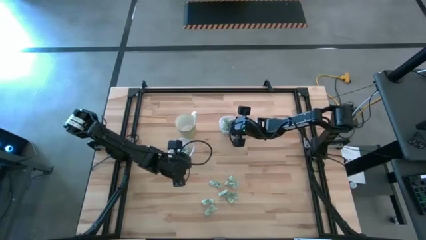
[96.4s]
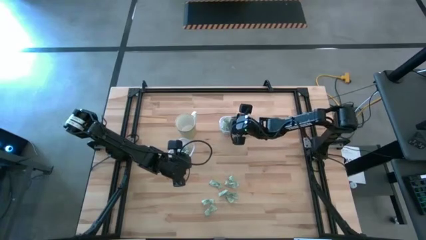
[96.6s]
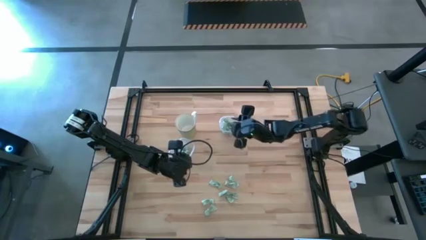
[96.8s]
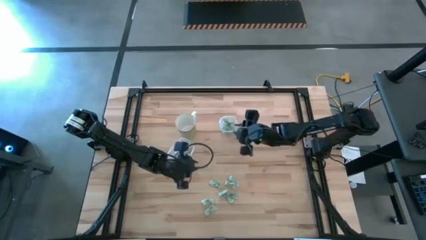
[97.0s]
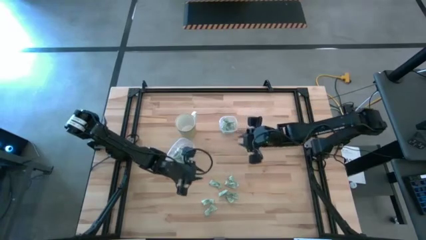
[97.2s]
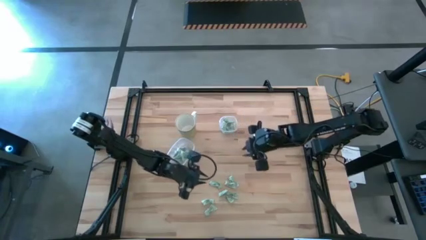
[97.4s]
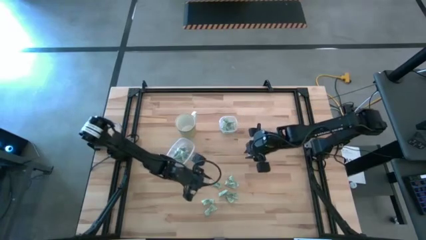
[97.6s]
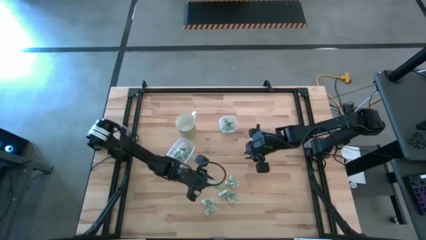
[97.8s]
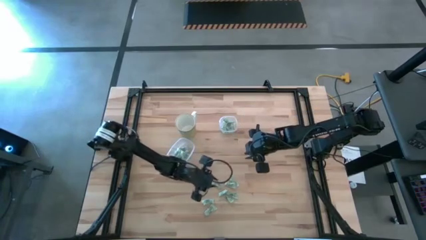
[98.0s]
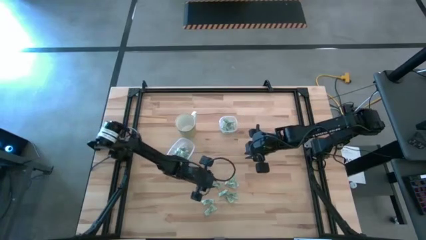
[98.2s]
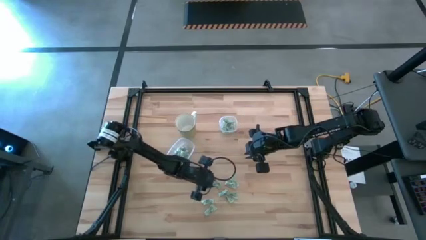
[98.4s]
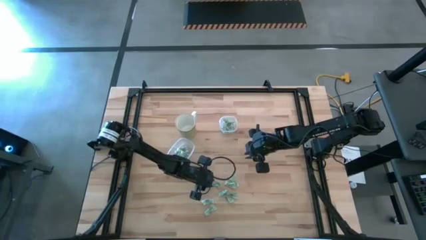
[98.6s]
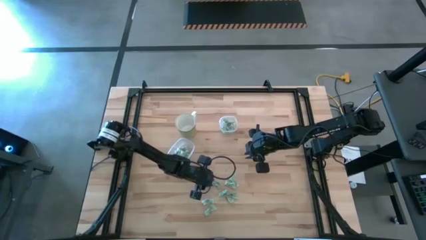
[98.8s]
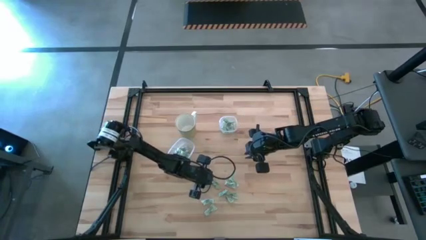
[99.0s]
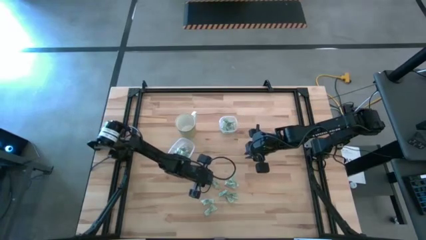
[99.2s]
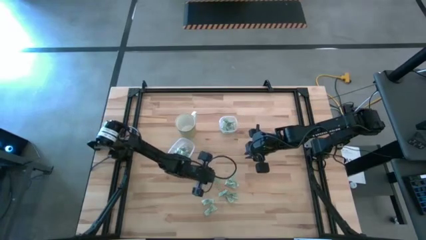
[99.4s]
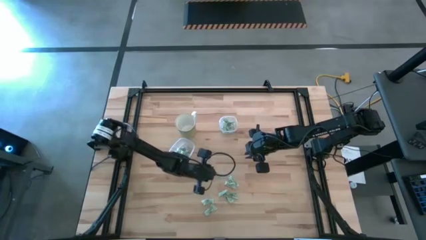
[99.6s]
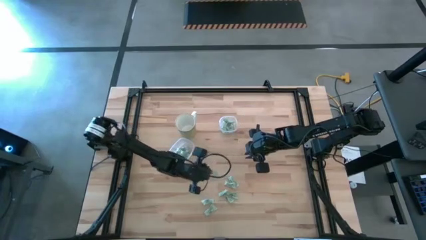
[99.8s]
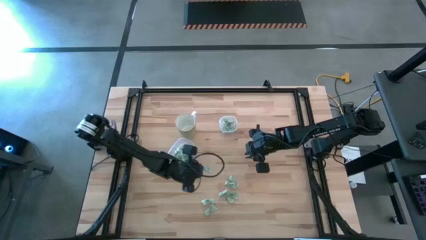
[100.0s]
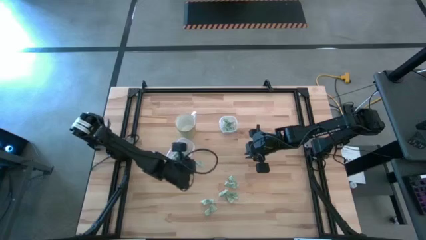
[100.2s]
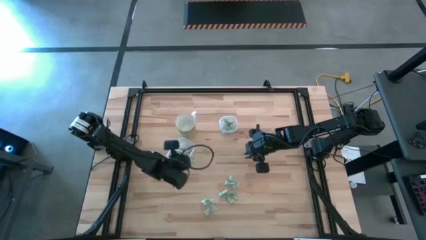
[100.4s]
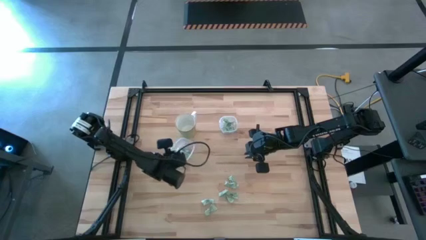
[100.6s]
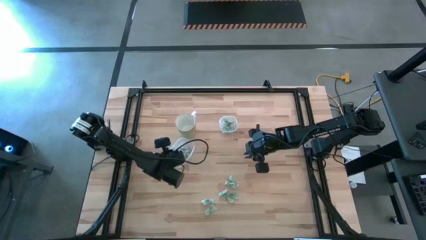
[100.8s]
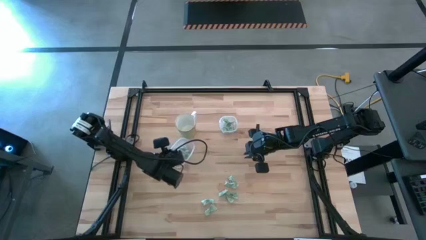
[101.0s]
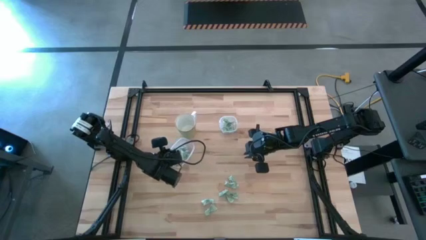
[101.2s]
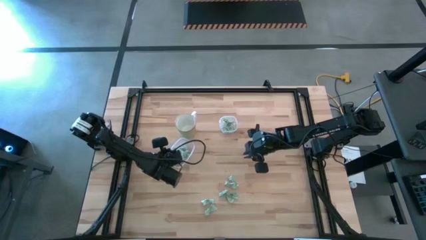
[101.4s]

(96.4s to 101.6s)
Task: Pick and place items into bin
Put the stevia packet into the bottom transparent bin

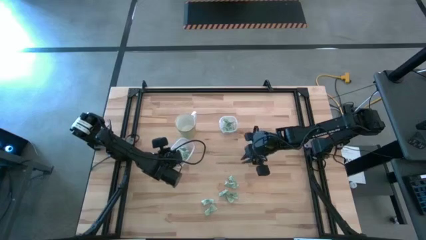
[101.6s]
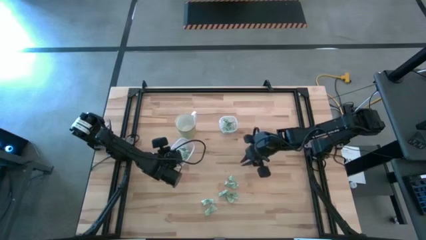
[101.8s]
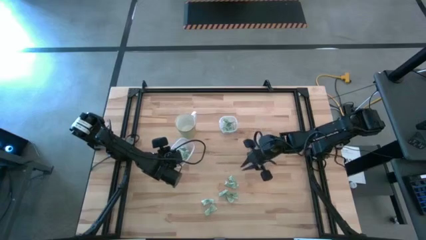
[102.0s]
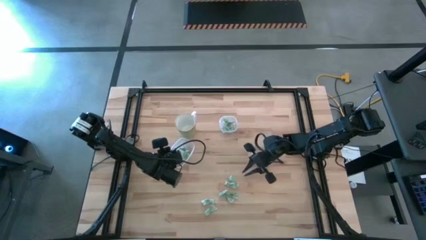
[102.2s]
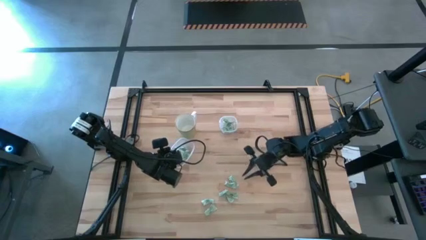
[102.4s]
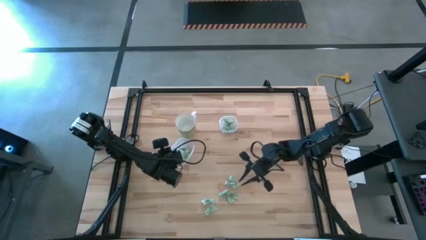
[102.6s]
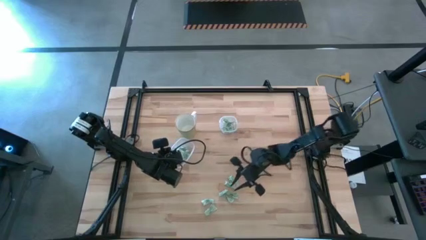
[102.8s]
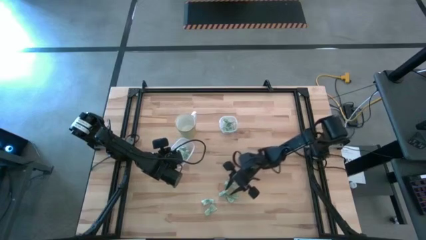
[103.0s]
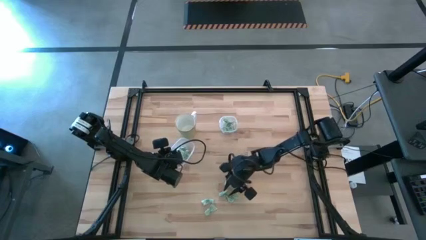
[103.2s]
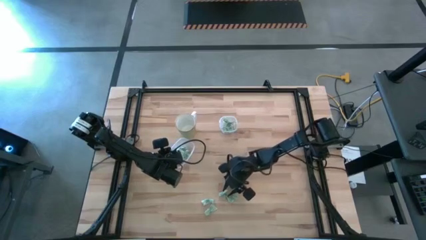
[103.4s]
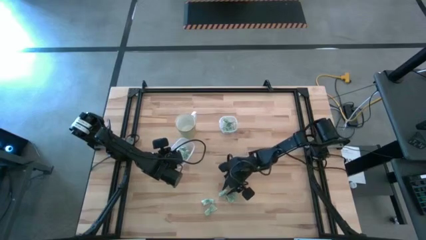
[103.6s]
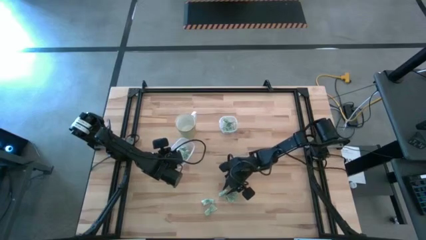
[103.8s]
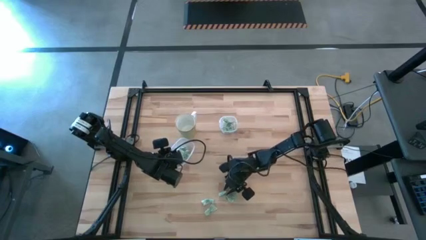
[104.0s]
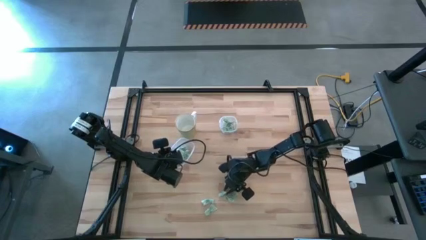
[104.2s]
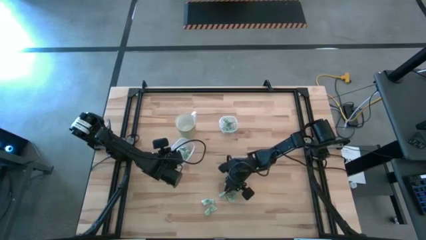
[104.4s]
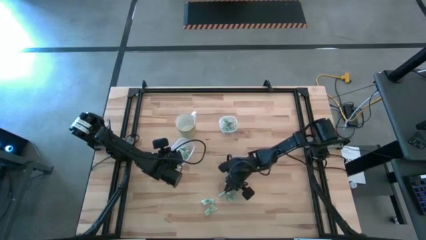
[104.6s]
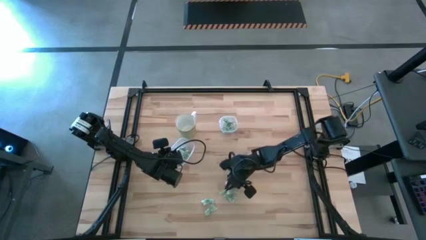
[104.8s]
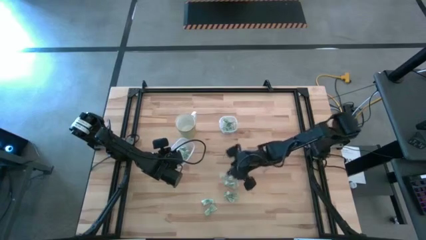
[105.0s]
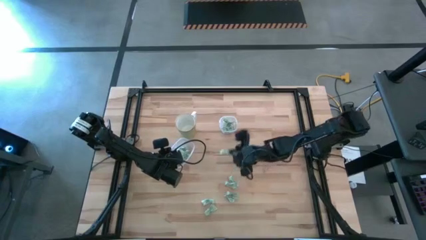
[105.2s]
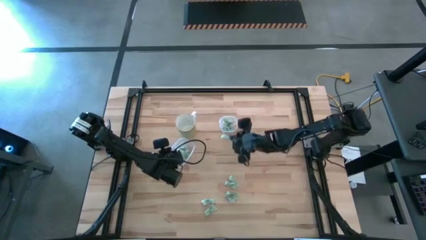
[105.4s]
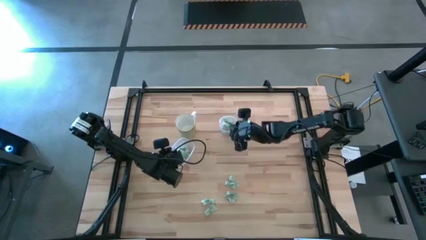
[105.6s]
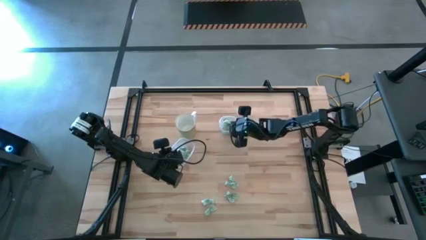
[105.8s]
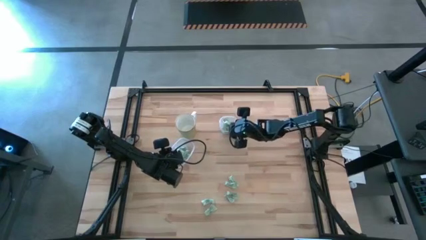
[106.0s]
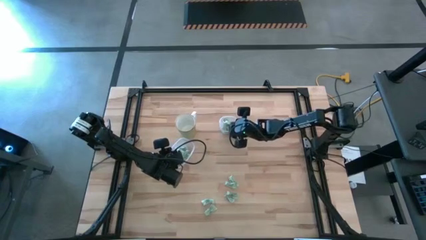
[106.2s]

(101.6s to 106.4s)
Put the stevia packet into the top transparent bin

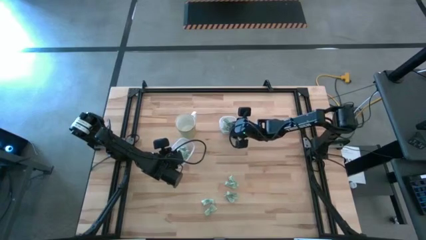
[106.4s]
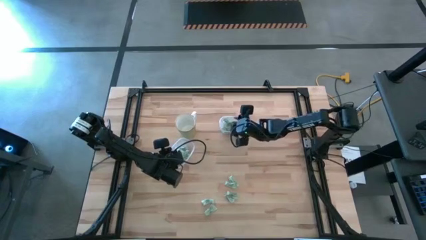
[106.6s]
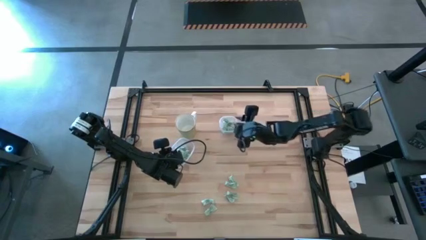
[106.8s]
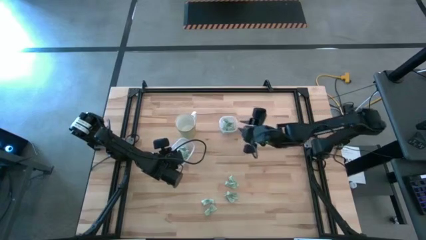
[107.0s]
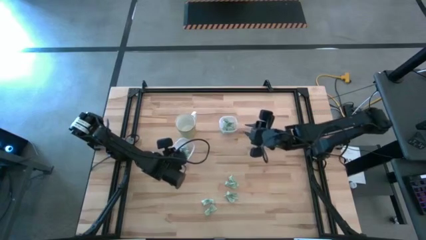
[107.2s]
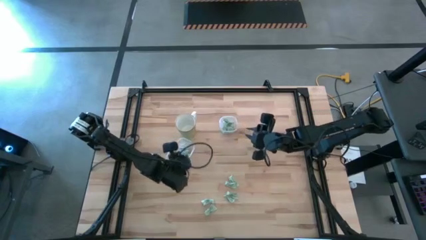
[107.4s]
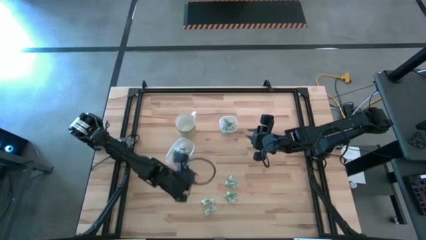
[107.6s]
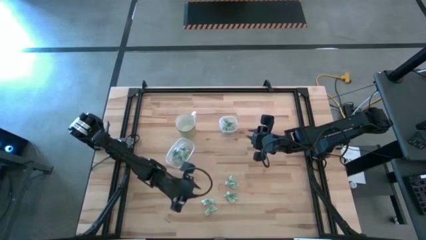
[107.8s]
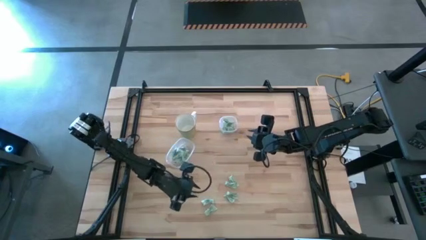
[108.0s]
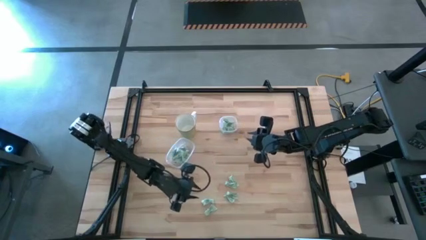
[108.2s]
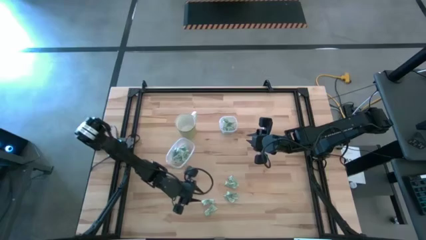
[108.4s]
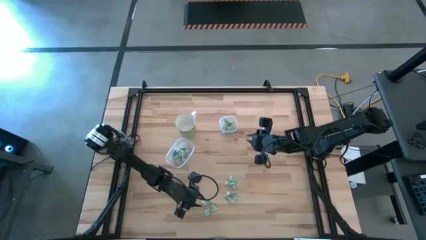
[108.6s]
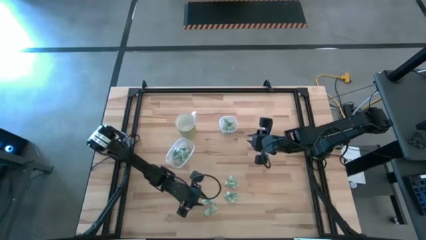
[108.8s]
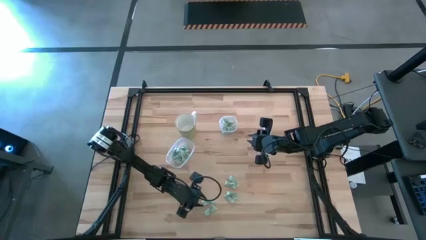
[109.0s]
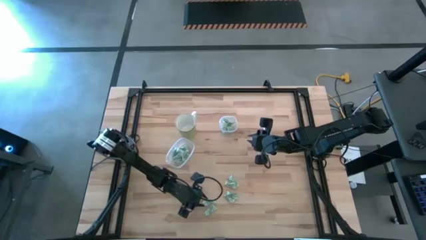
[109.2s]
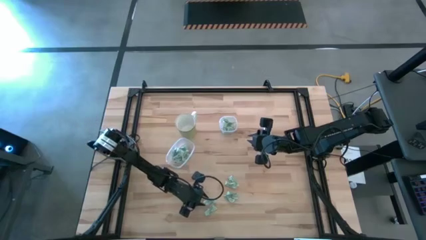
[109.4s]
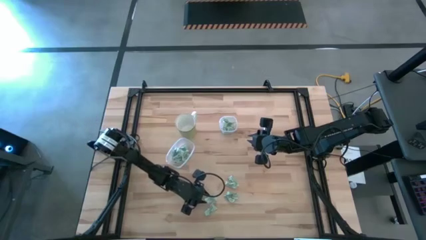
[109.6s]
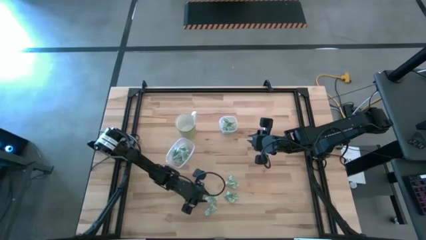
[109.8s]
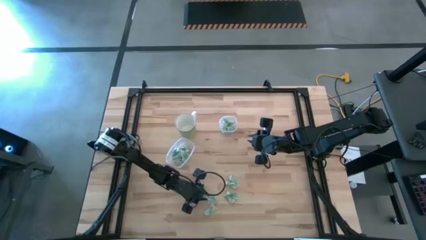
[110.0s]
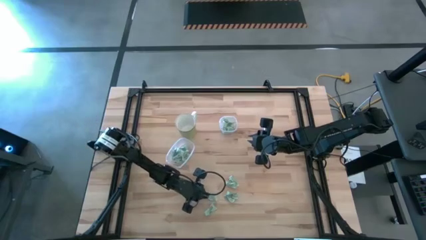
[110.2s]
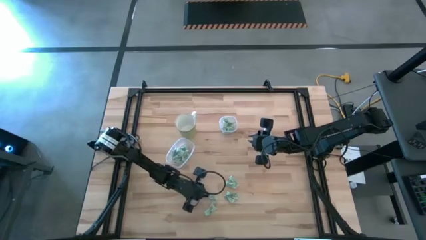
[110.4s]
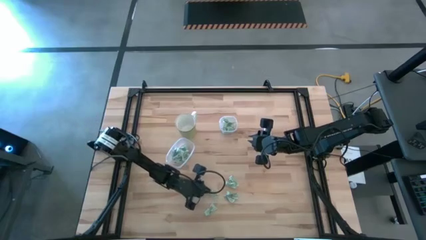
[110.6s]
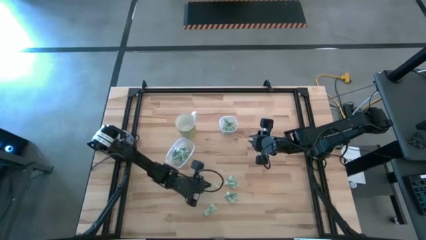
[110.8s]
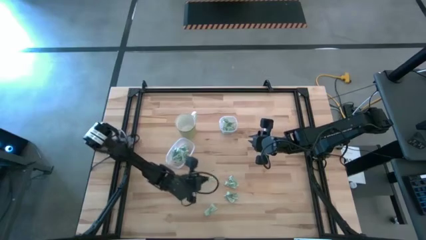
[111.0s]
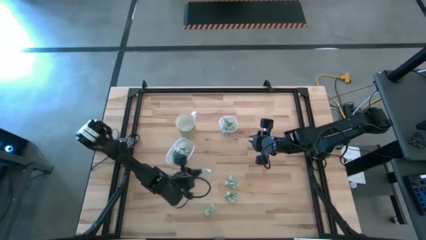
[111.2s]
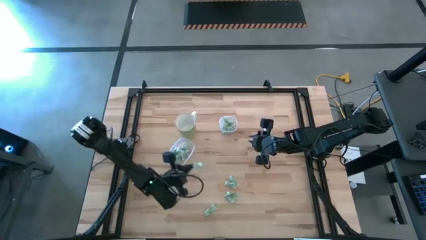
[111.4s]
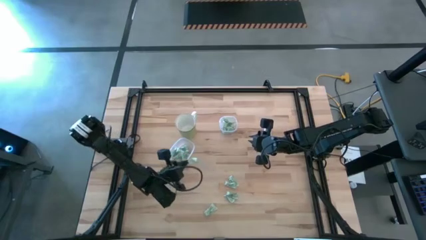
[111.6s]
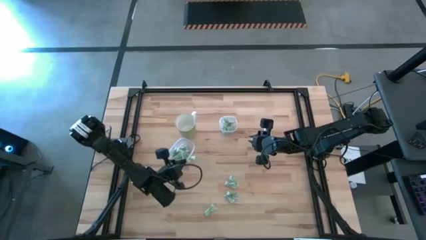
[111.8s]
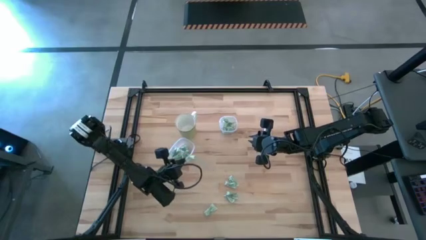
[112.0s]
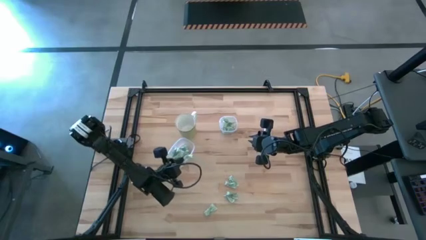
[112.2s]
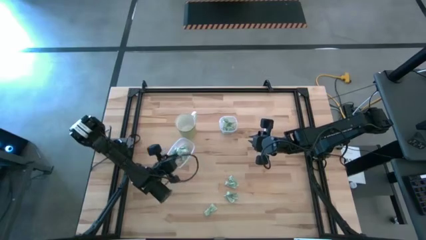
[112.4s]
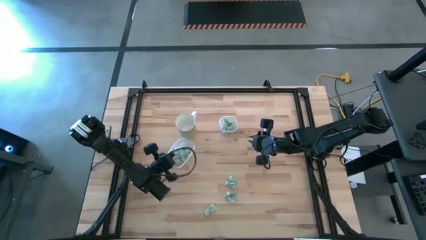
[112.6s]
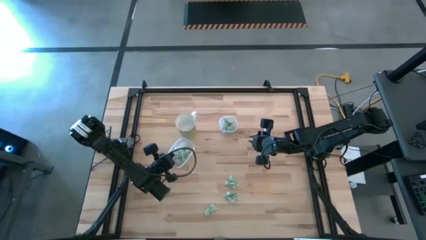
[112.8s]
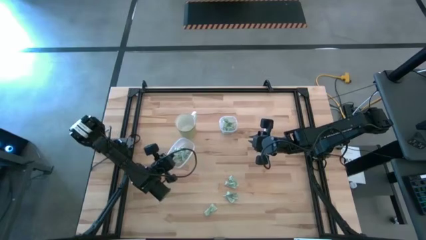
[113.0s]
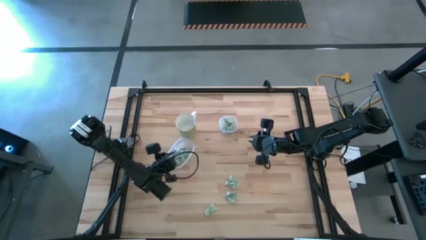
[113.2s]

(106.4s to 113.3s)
Put the stevia packet into the bottom transparent bin
